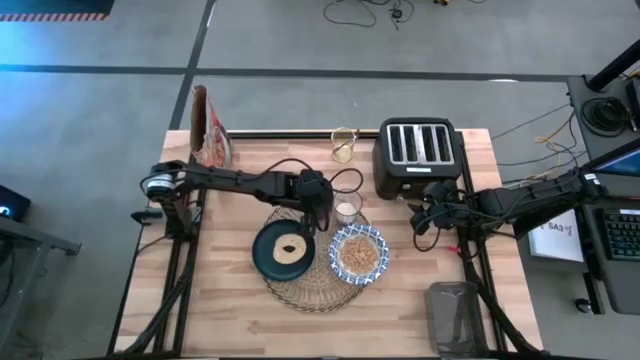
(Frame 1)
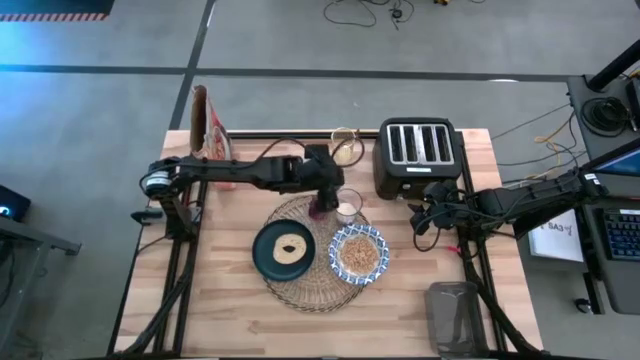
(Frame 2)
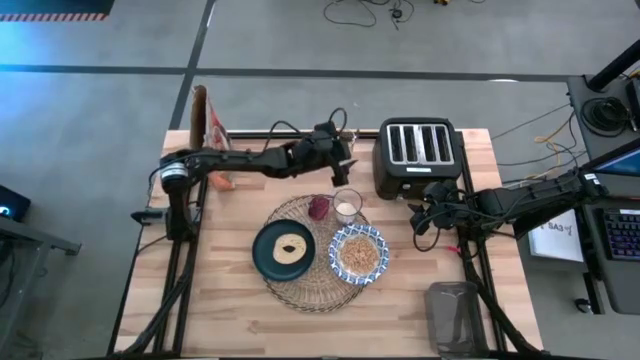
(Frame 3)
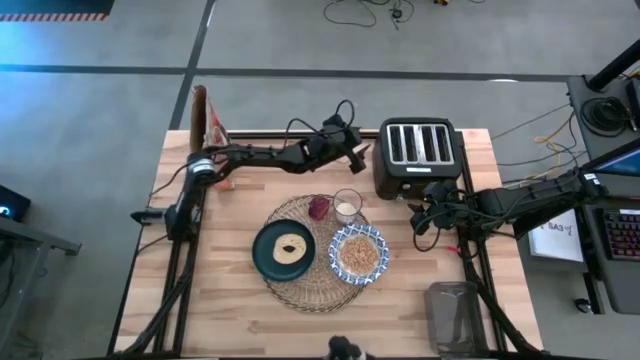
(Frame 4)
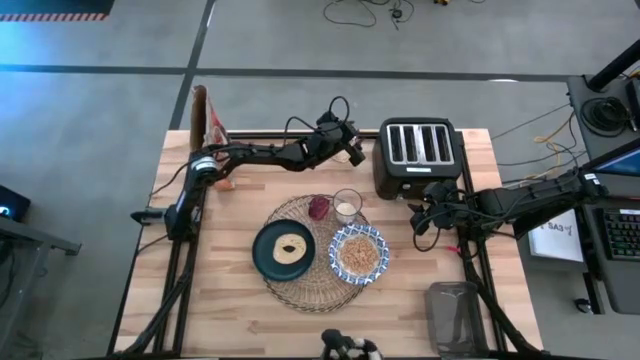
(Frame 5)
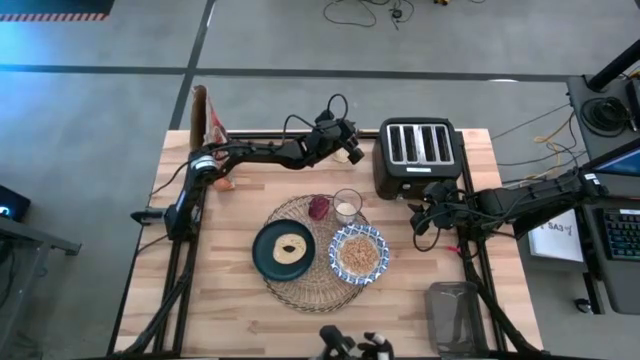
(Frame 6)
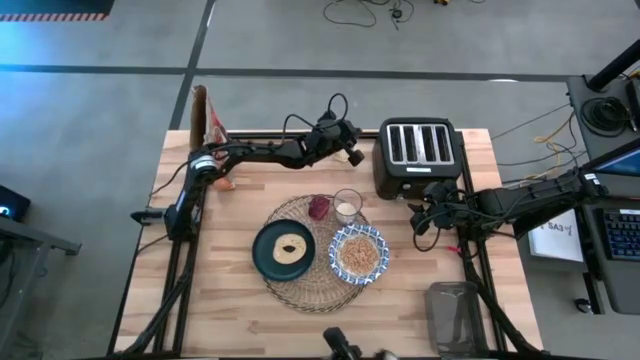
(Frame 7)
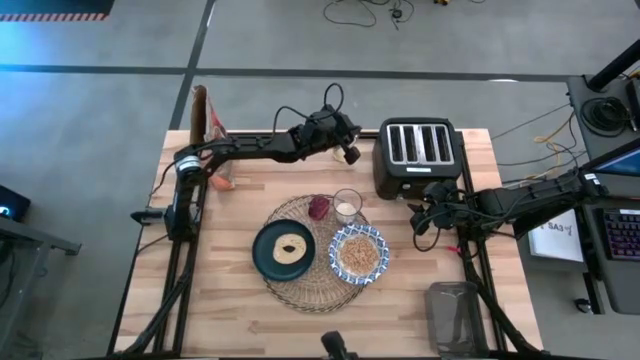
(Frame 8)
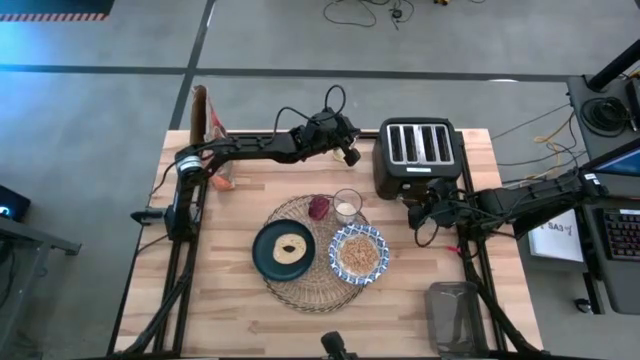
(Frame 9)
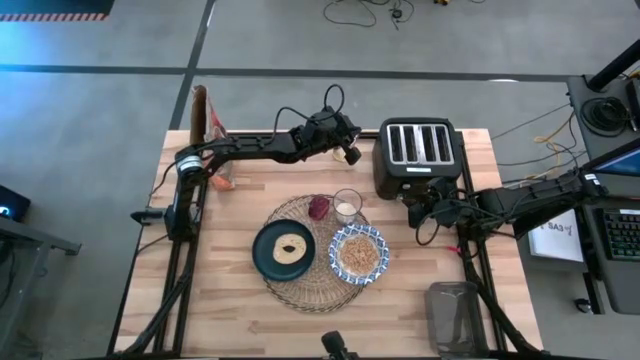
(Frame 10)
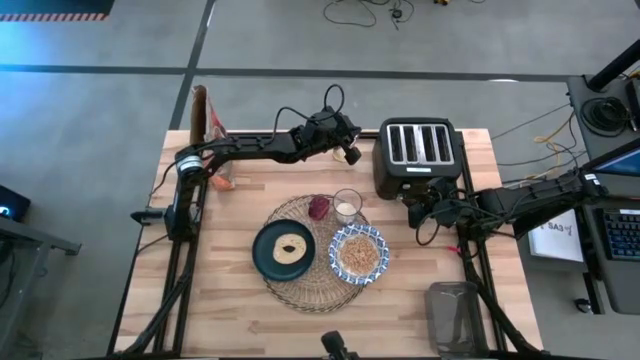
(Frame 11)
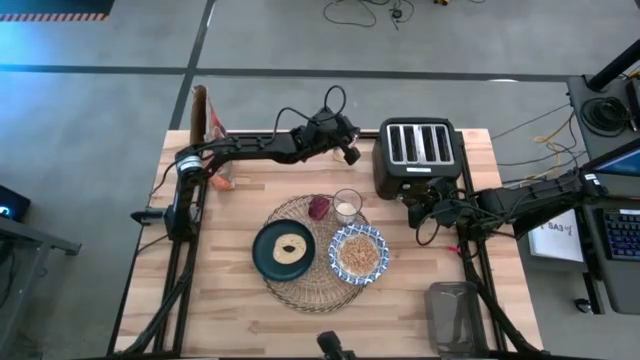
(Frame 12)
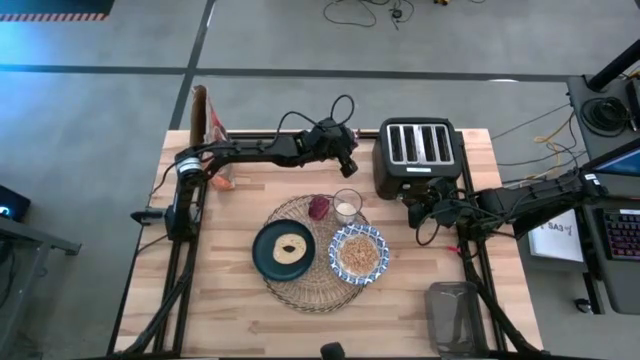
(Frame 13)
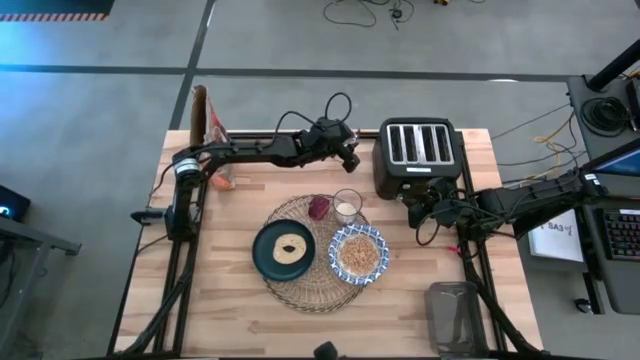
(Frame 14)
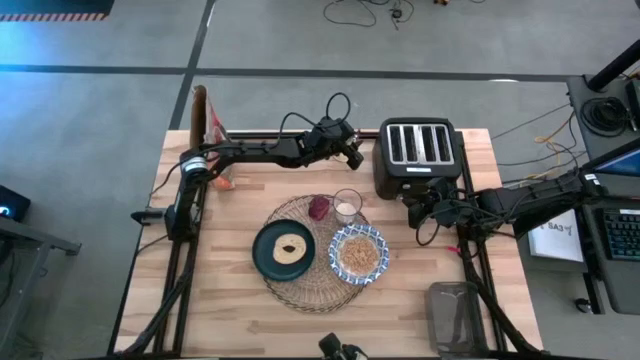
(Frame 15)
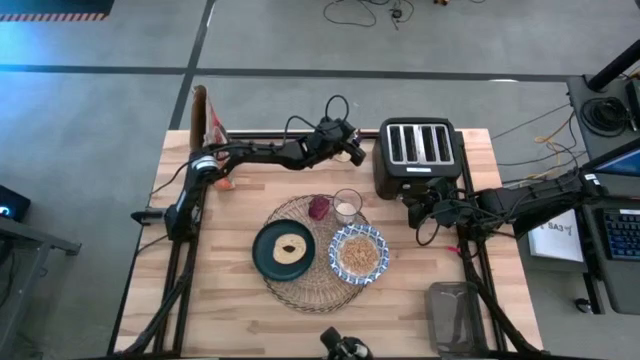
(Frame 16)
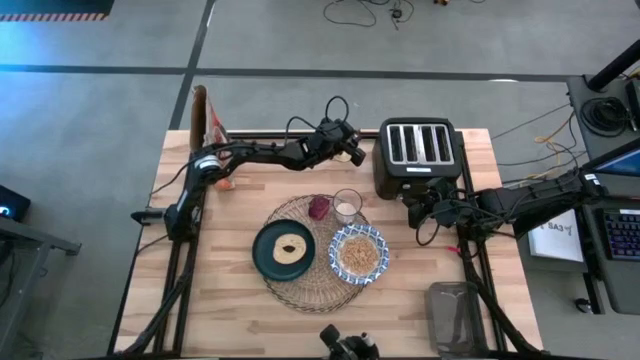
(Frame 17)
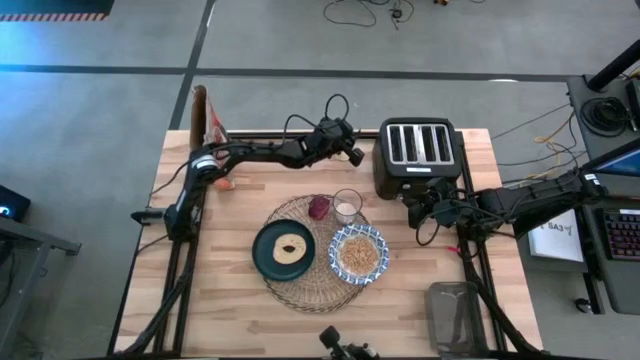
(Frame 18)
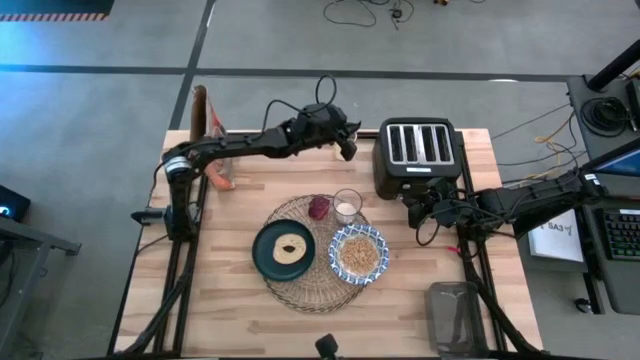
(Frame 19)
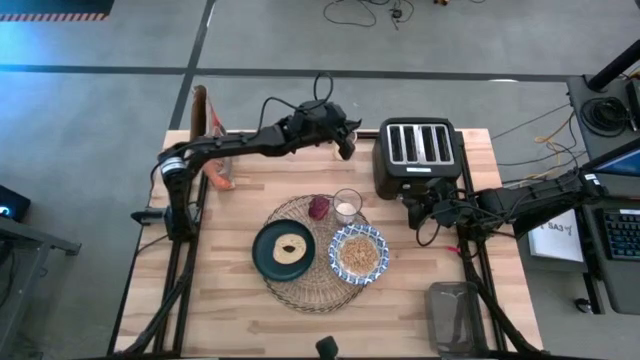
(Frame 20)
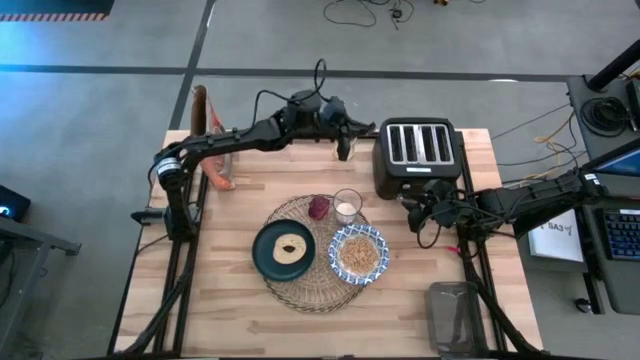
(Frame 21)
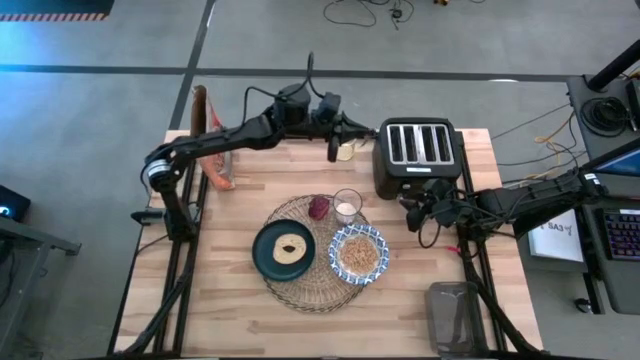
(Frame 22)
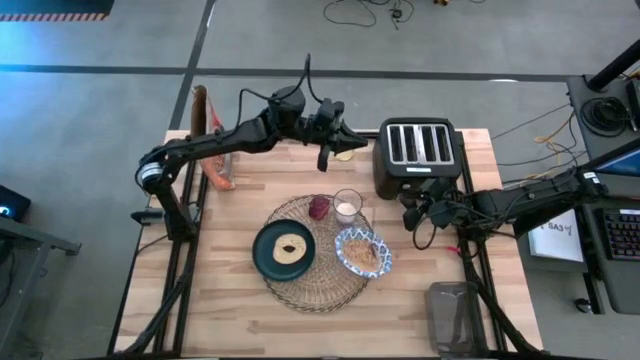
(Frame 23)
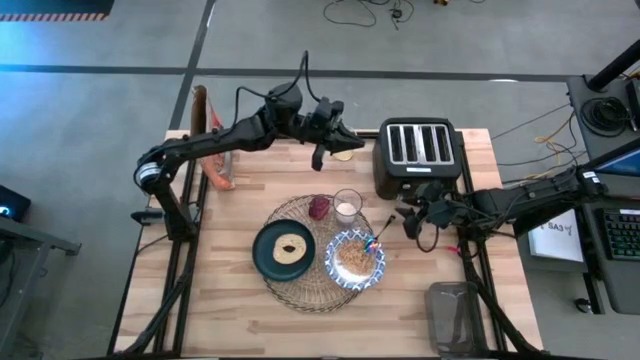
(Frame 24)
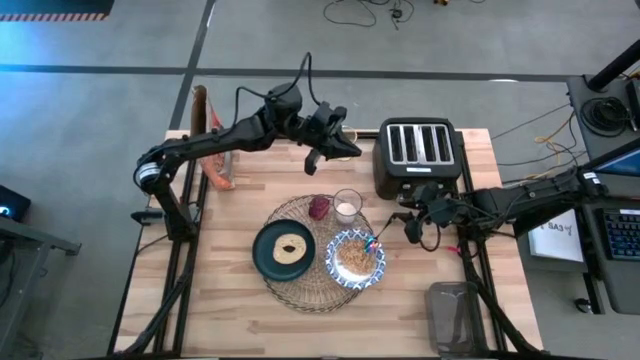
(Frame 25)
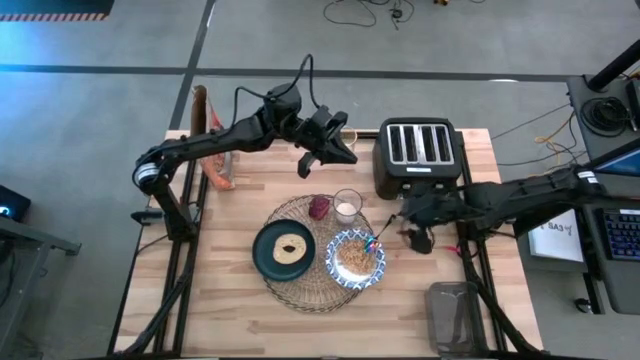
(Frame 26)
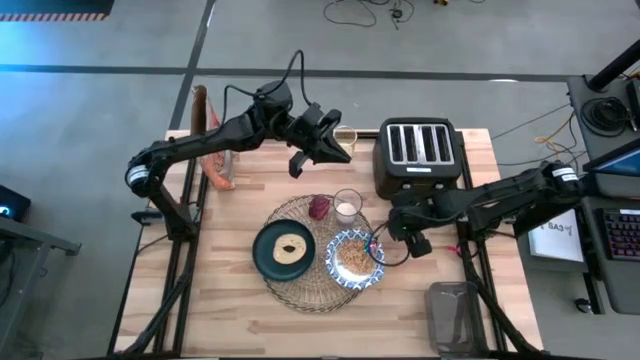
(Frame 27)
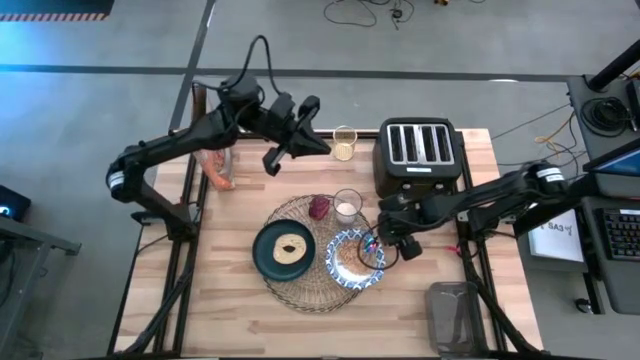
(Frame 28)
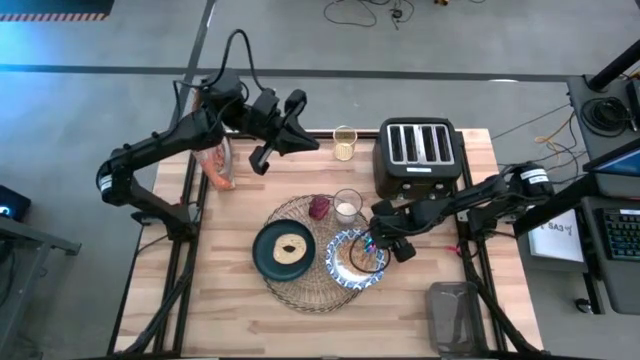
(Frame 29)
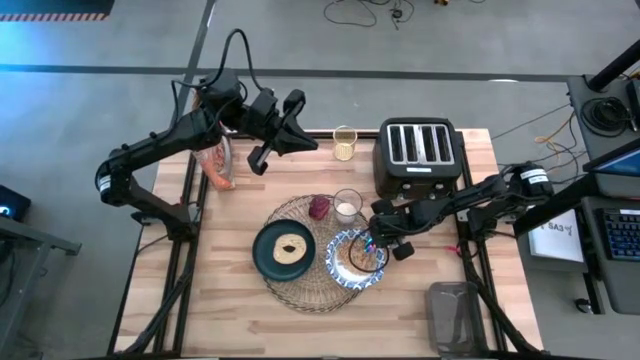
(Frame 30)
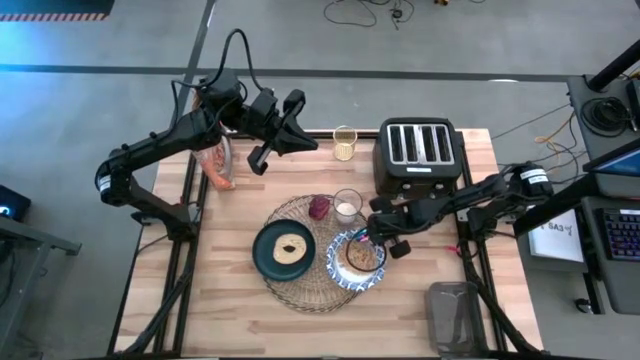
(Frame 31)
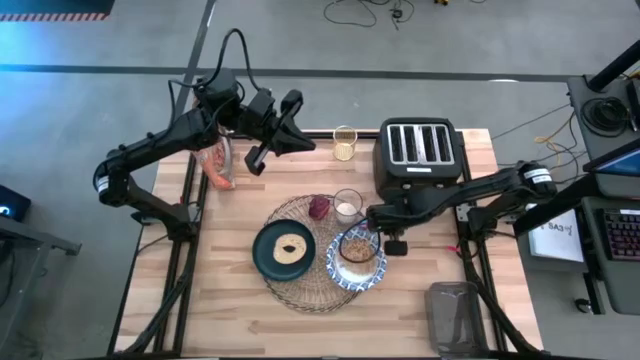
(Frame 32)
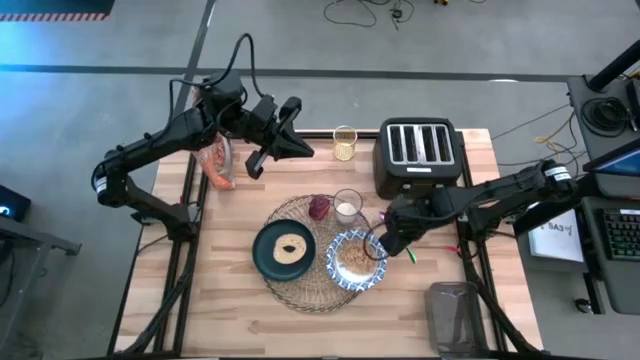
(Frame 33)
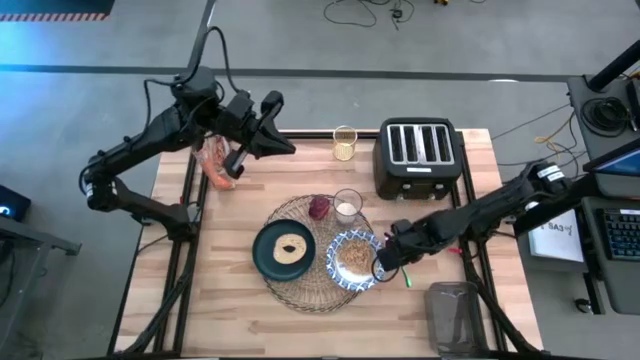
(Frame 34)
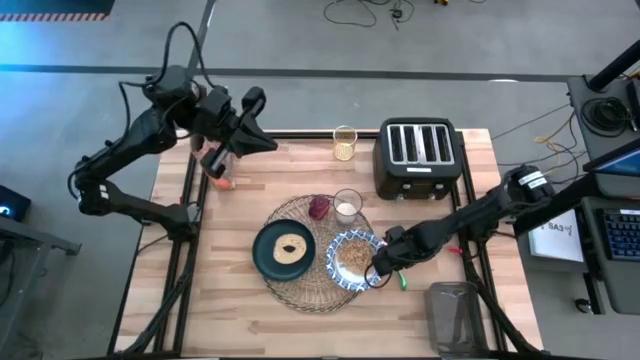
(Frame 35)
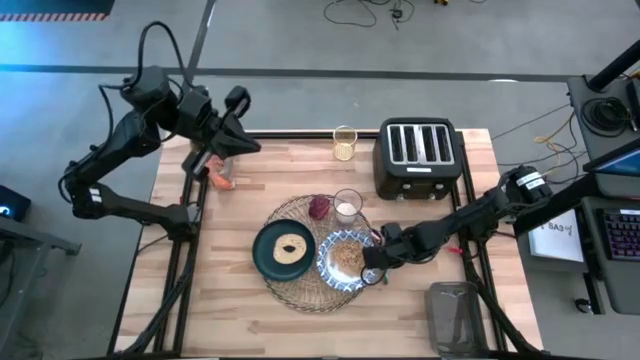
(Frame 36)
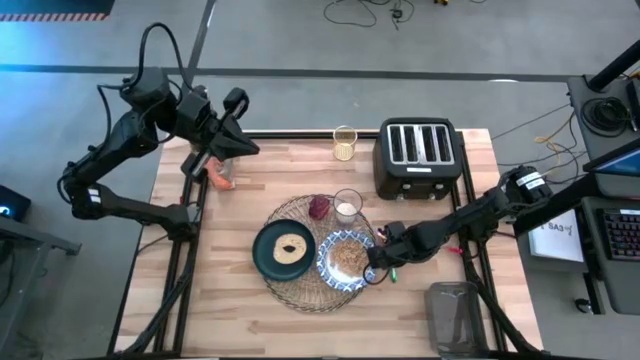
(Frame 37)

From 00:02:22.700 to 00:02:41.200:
Task: Arrange a breakfast setting
Put the violet spoon on the brown table mat

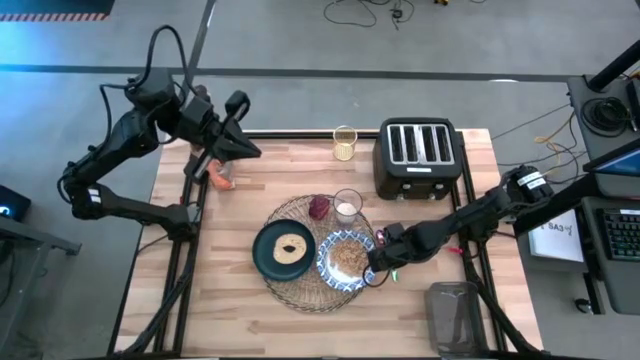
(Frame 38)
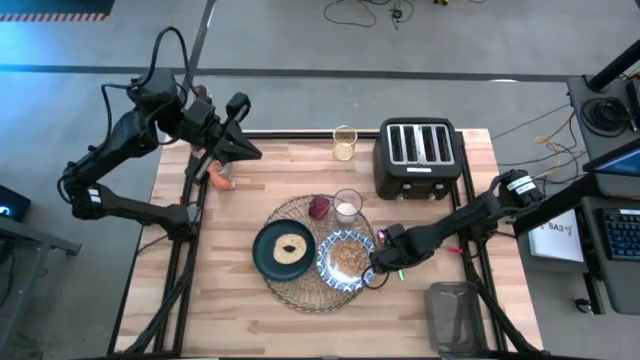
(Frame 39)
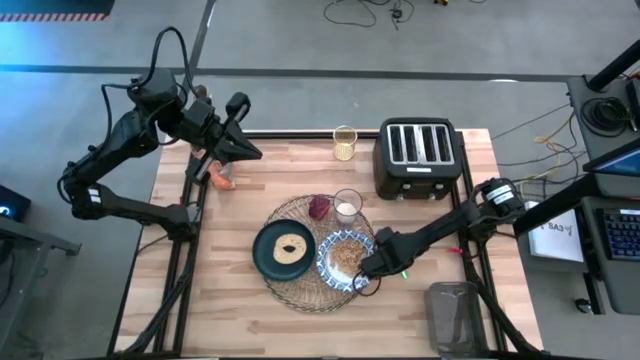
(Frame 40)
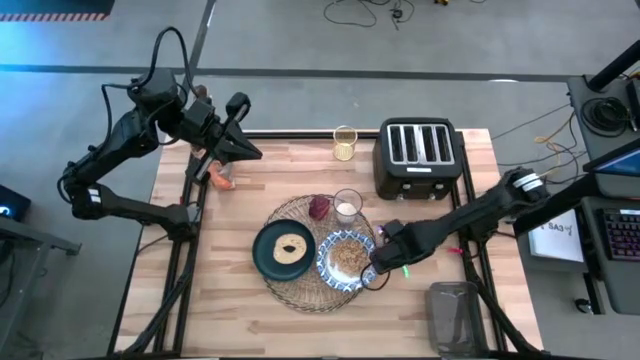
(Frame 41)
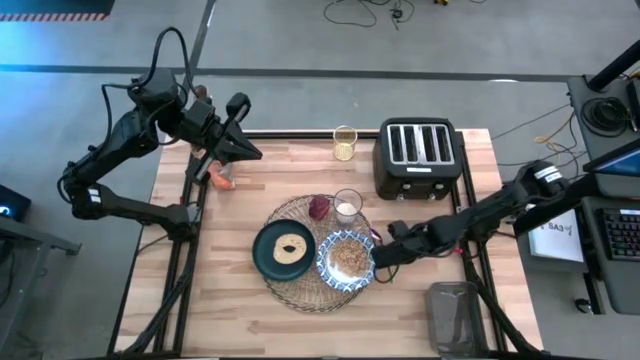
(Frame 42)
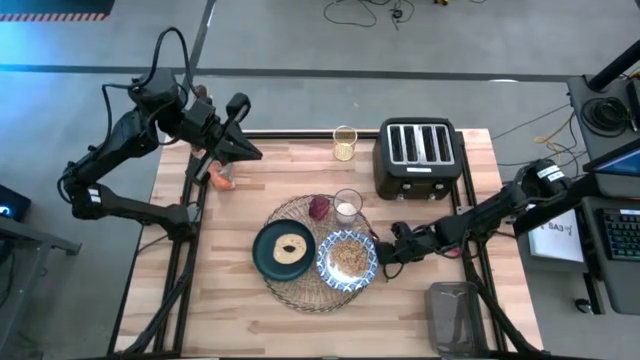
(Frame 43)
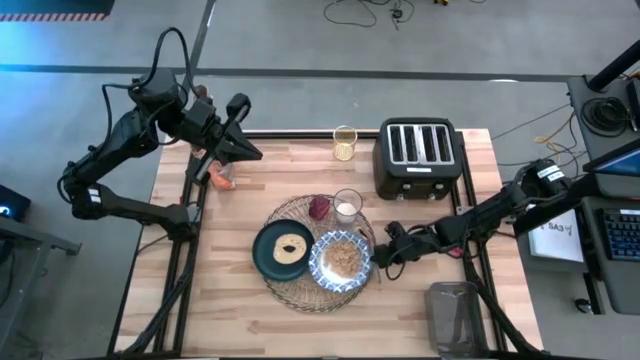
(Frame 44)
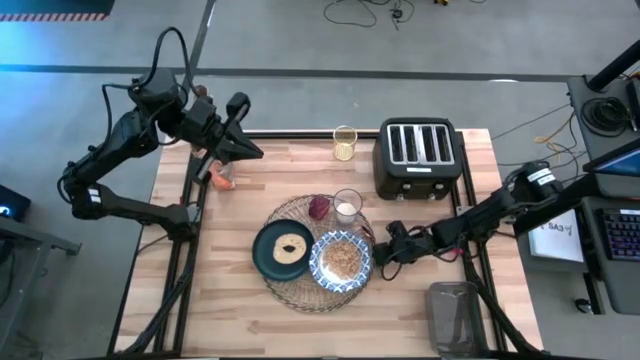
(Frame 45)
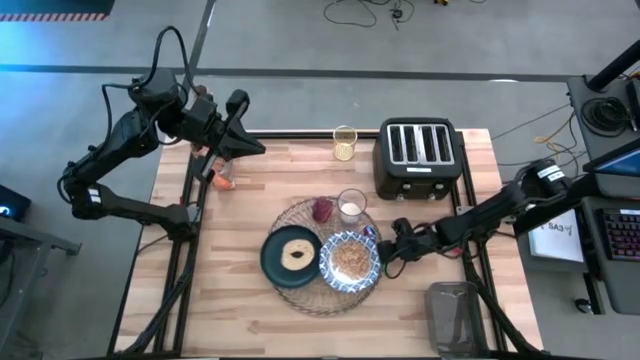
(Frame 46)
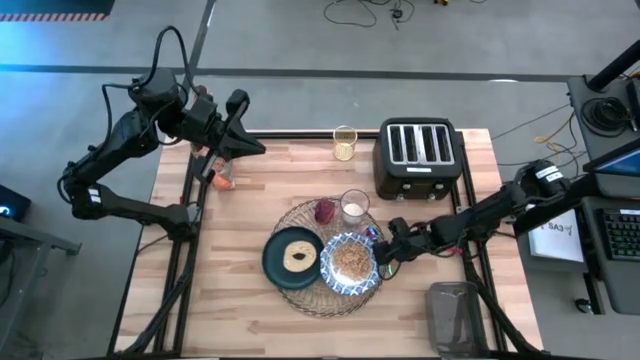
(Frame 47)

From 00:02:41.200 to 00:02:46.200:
Put the violet spoon on the brown table mat
